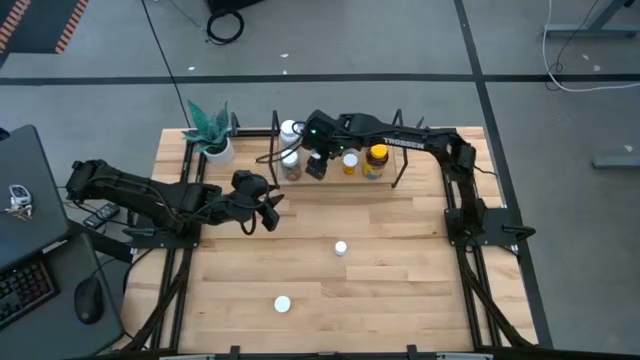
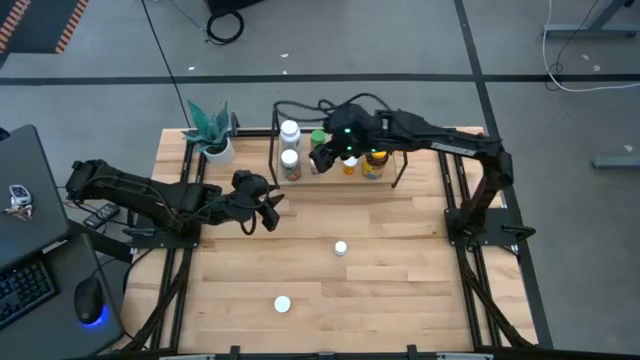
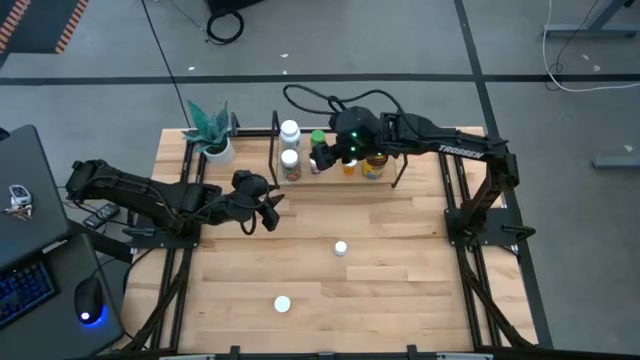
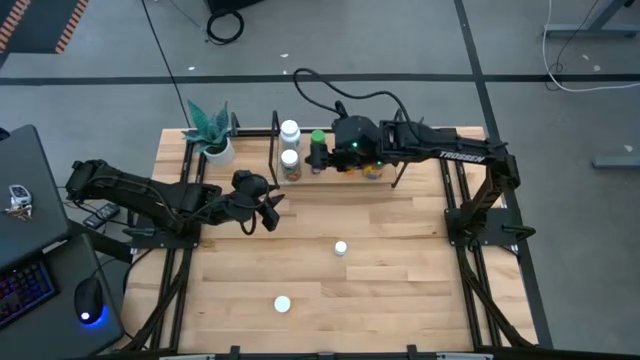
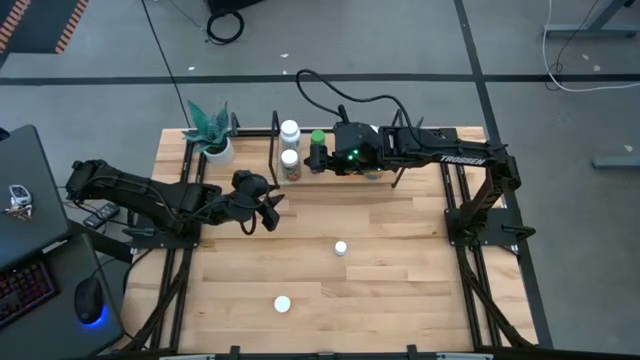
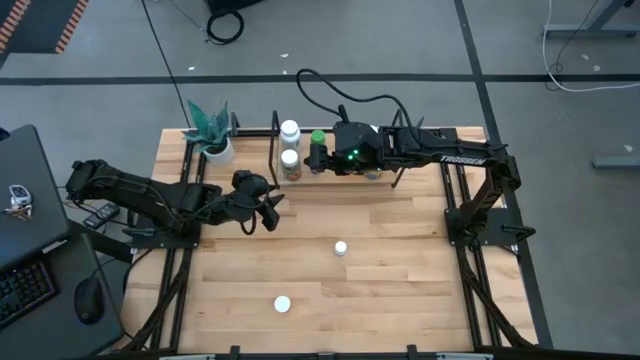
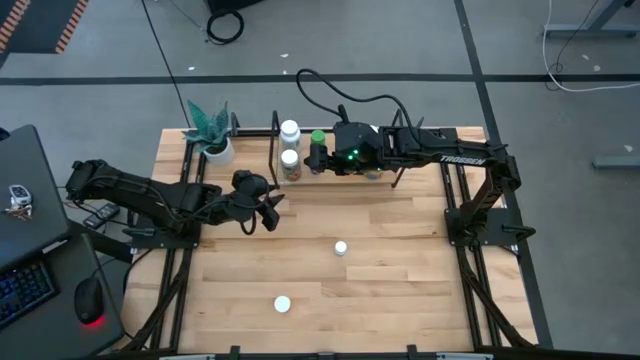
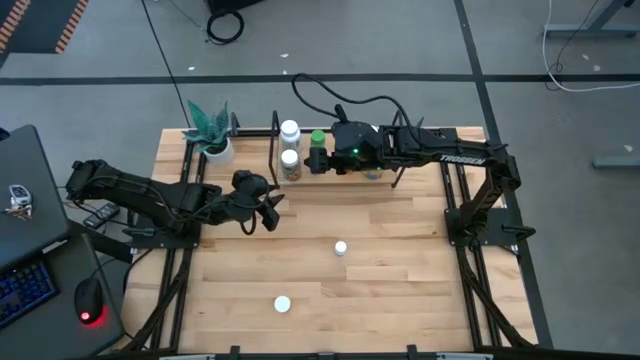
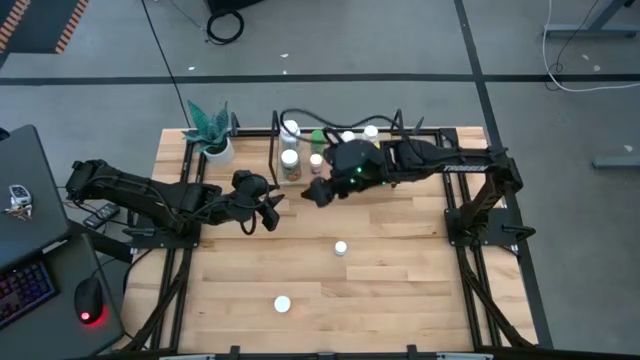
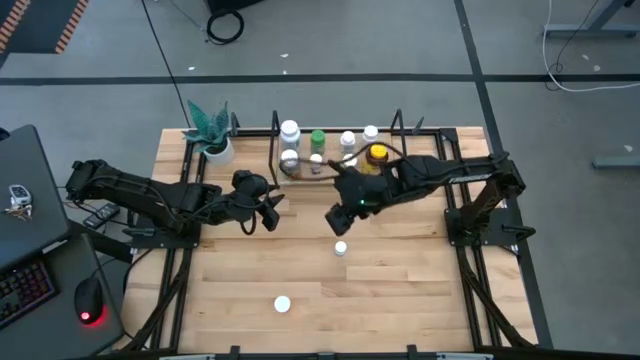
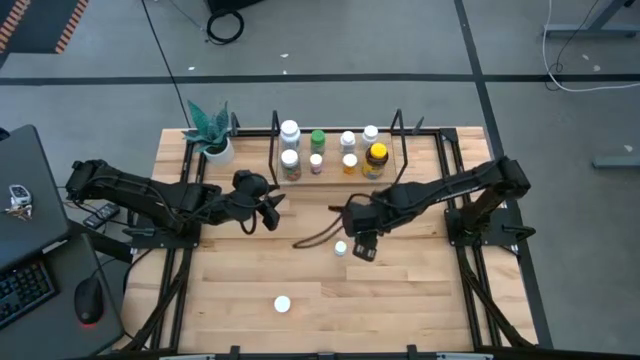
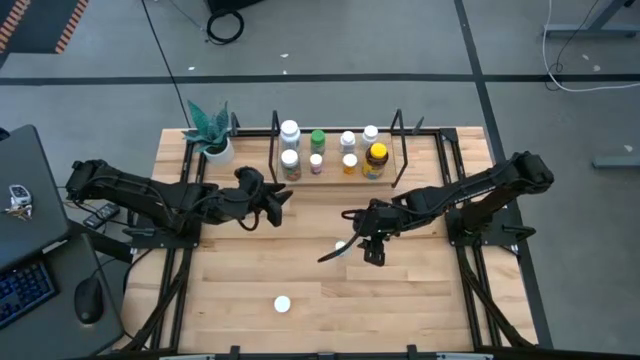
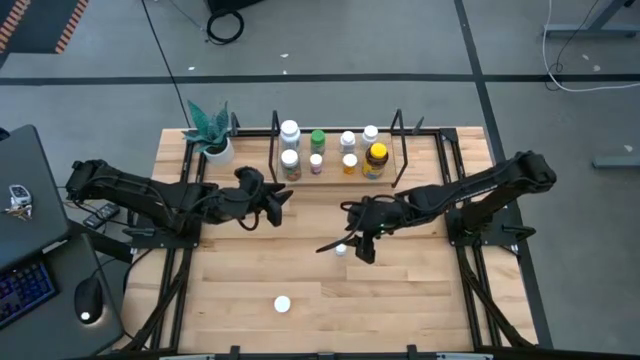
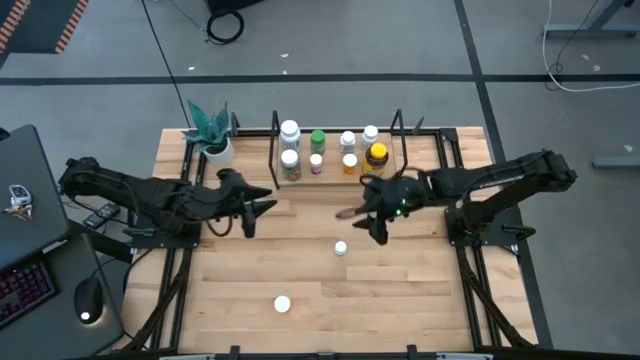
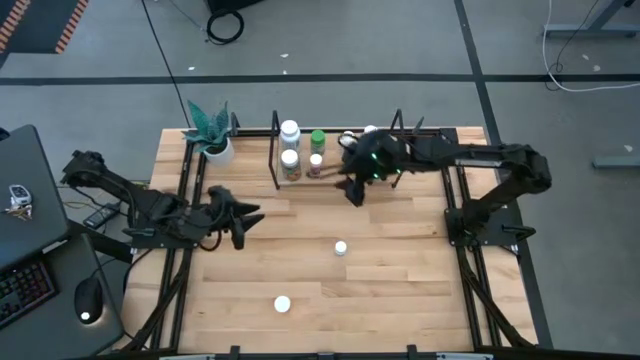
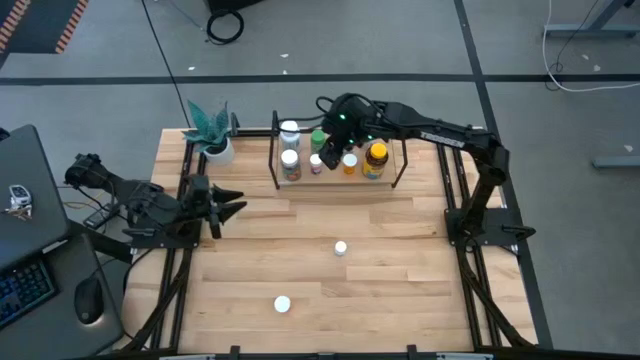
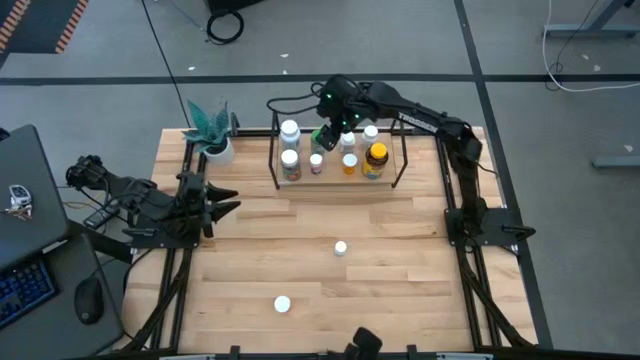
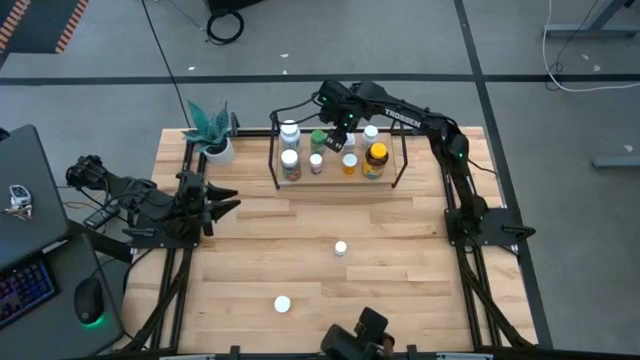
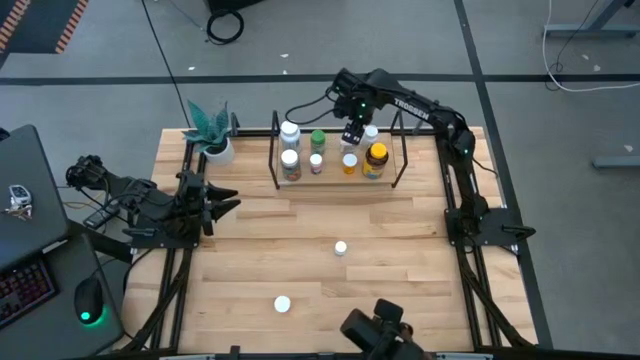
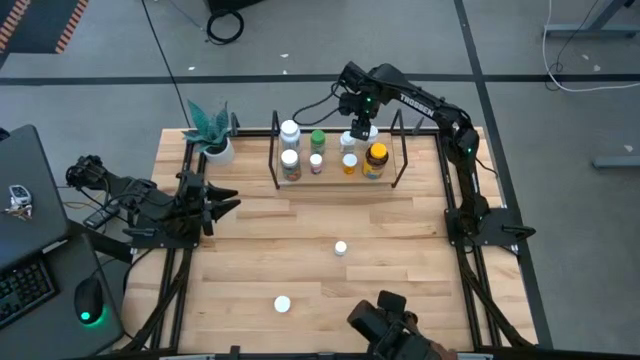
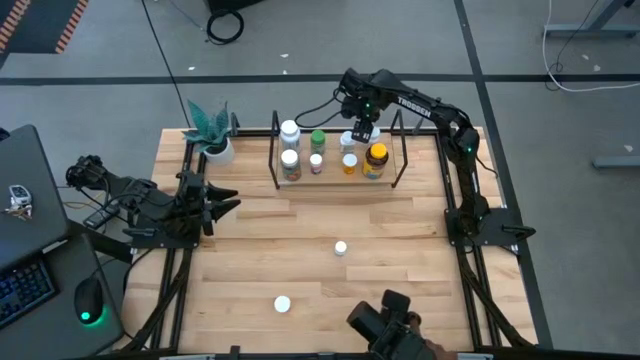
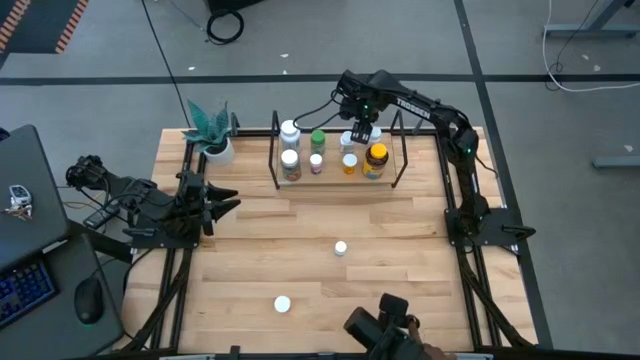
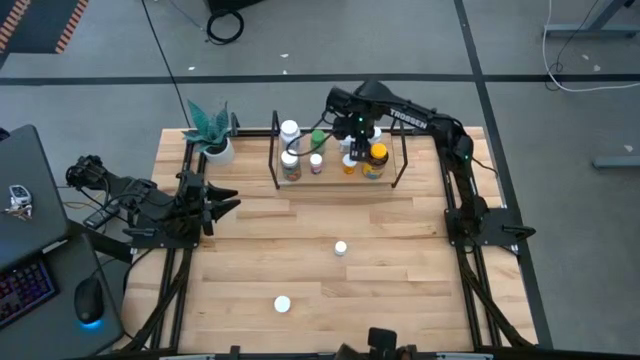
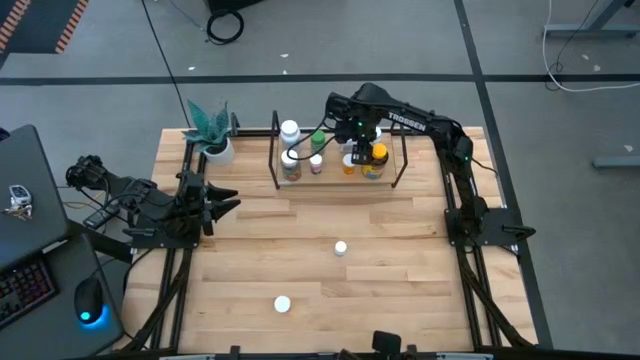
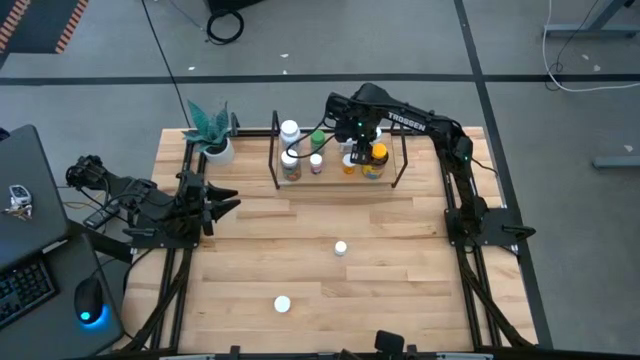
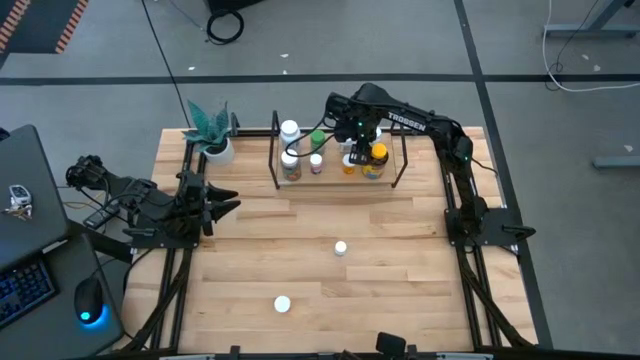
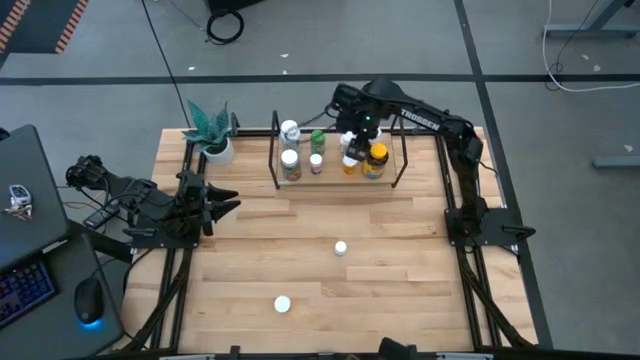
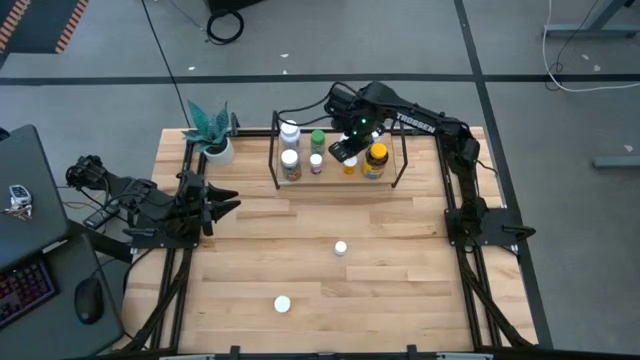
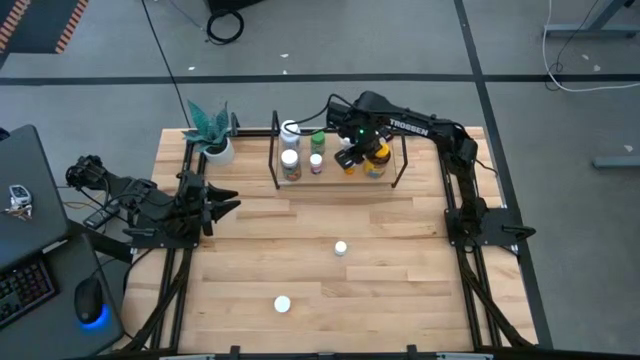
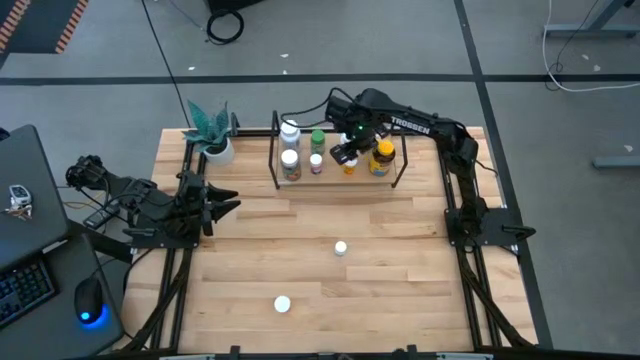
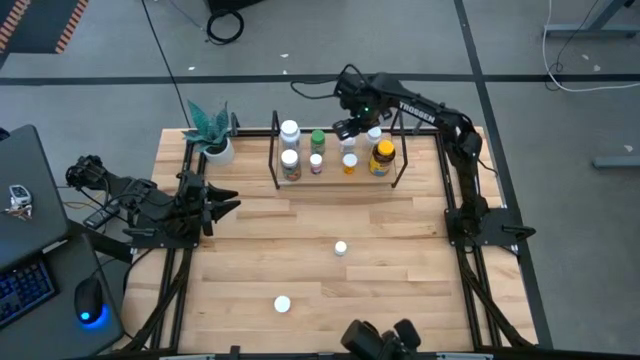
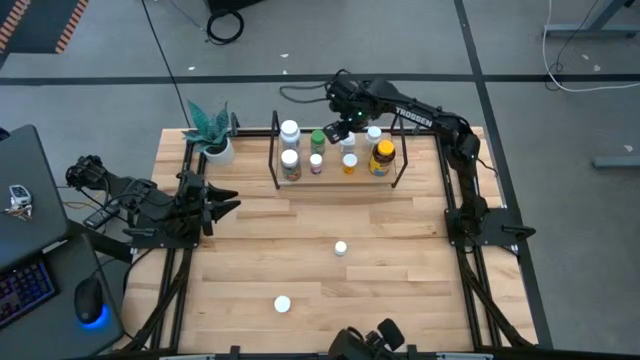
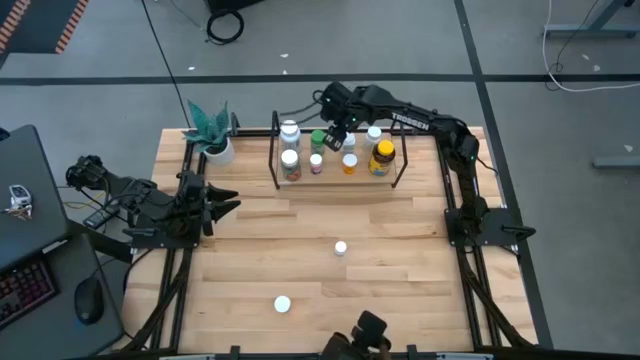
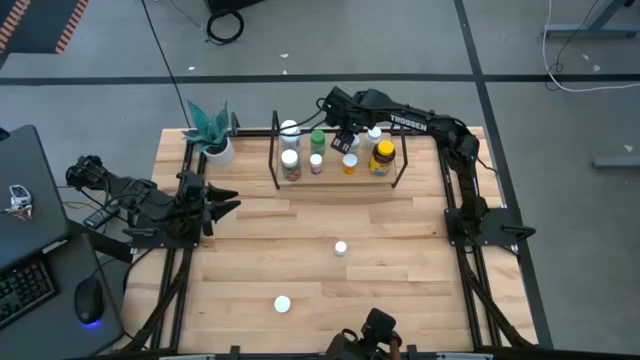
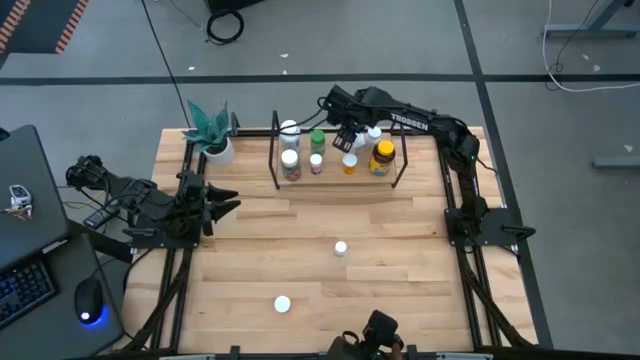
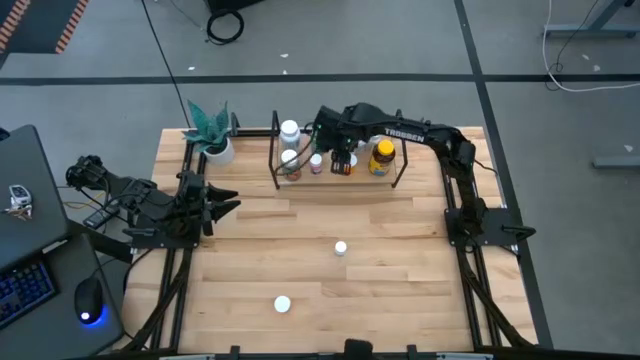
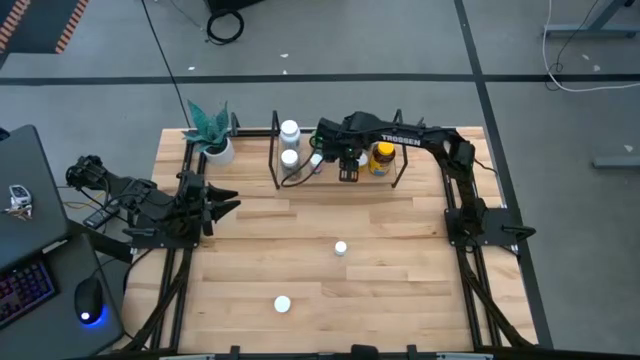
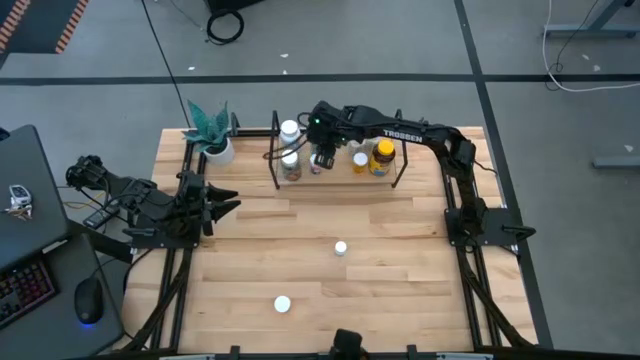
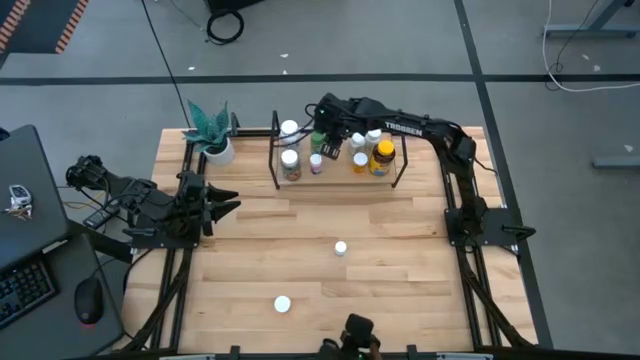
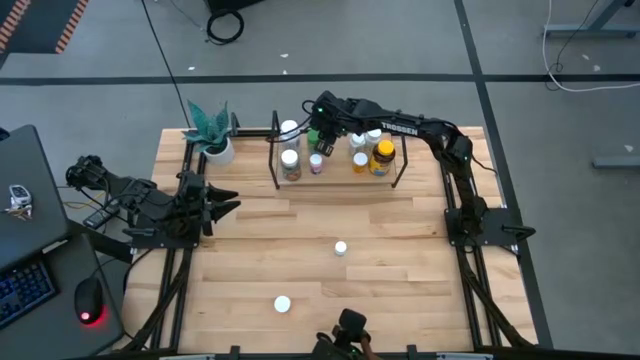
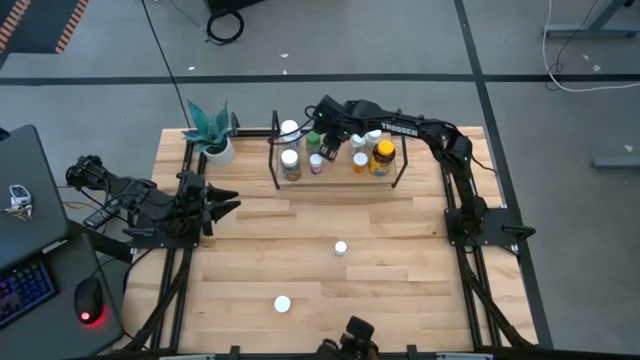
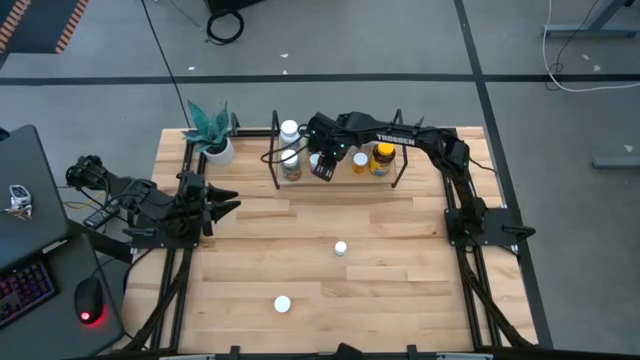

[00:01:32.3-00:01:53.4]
Task: Pick and place medicine bottles onto shelf by color
Adjust the pill bottles on the shelf
